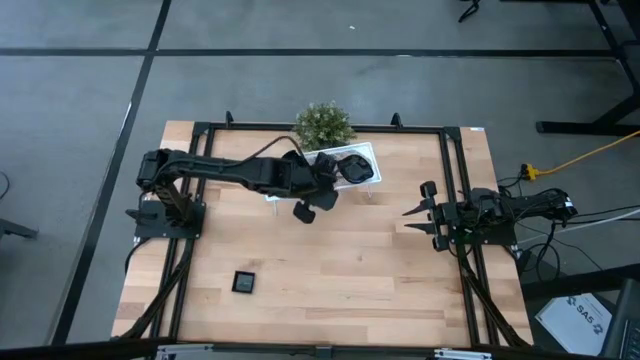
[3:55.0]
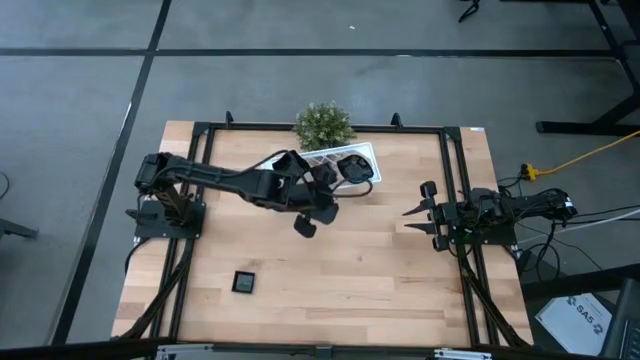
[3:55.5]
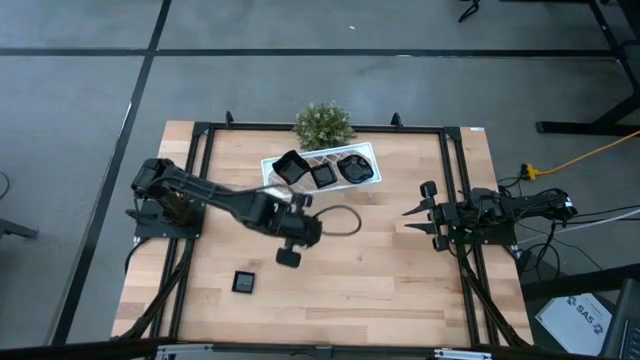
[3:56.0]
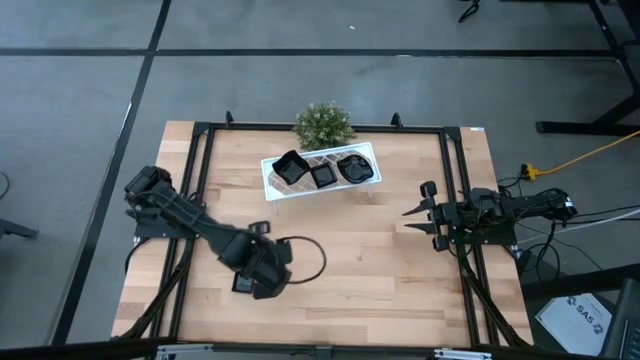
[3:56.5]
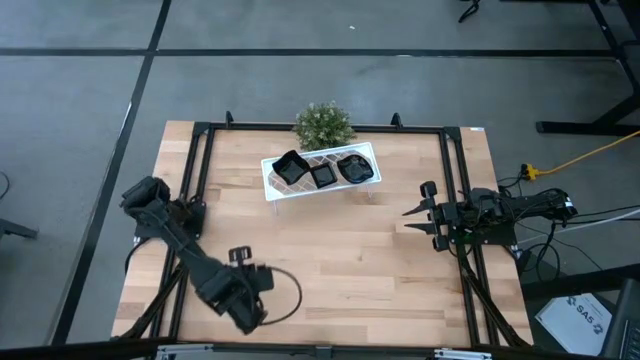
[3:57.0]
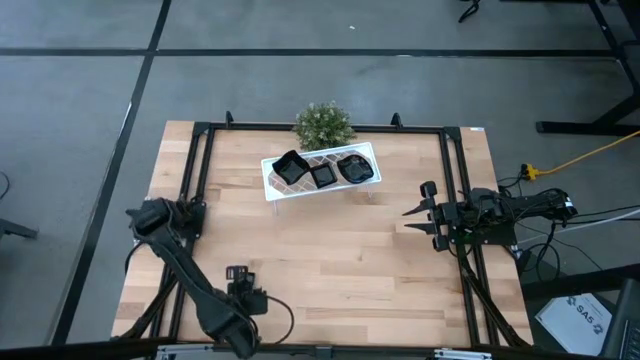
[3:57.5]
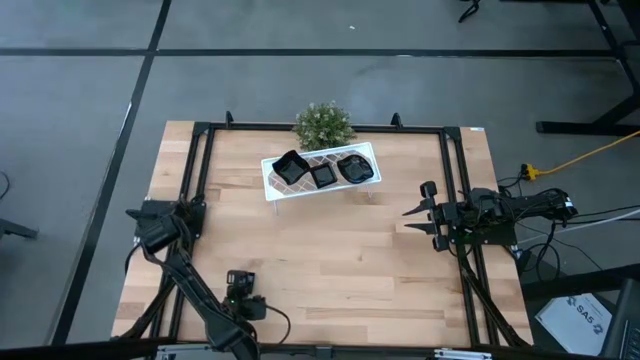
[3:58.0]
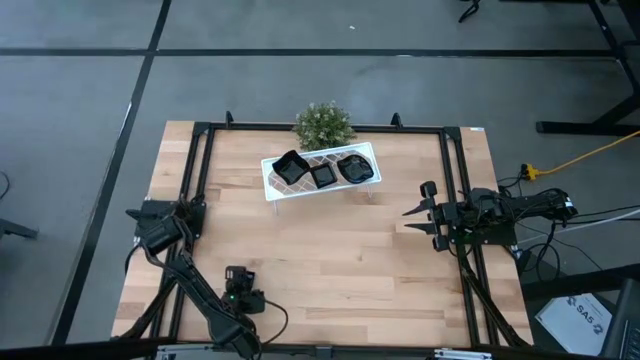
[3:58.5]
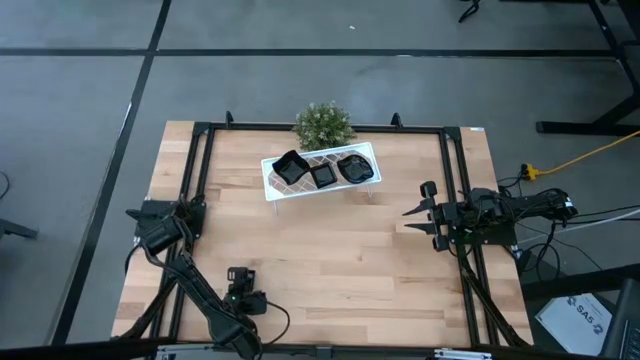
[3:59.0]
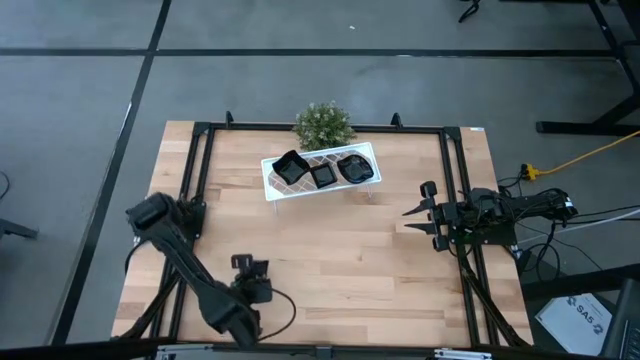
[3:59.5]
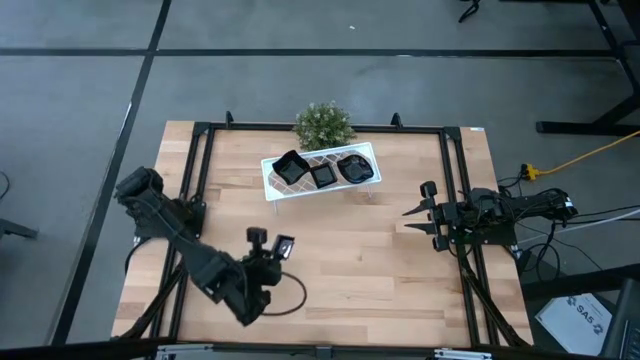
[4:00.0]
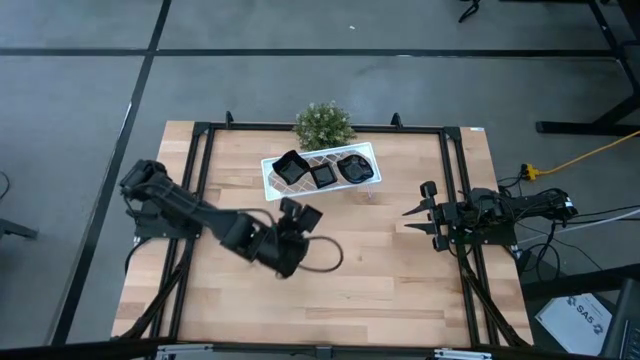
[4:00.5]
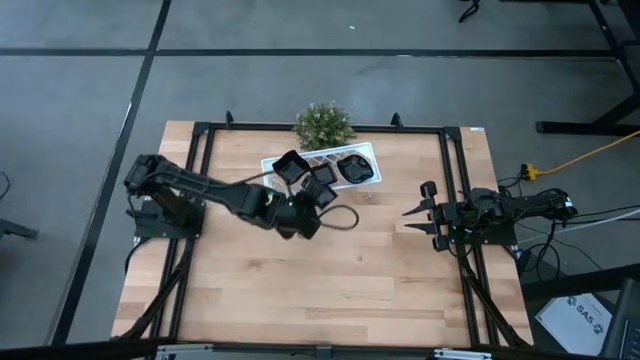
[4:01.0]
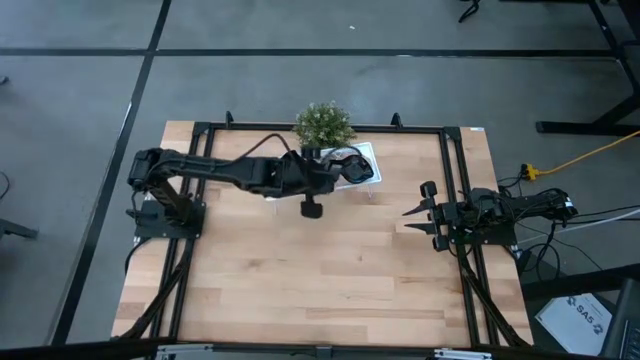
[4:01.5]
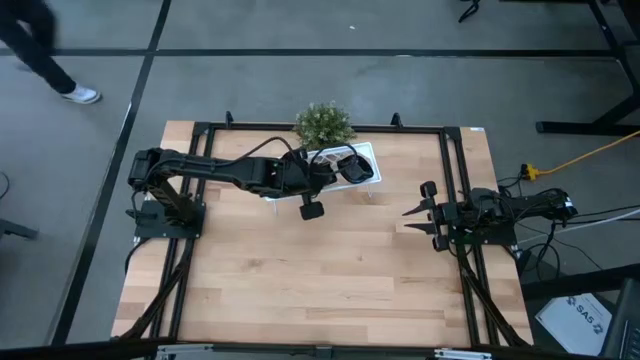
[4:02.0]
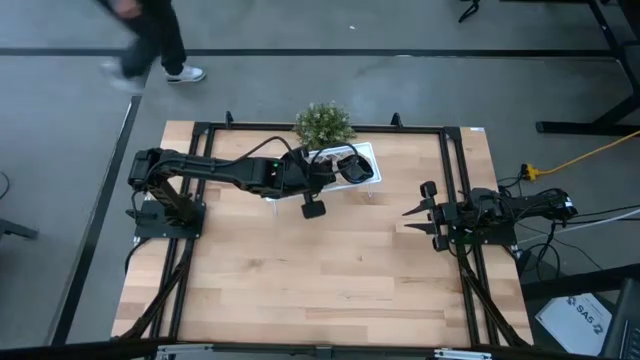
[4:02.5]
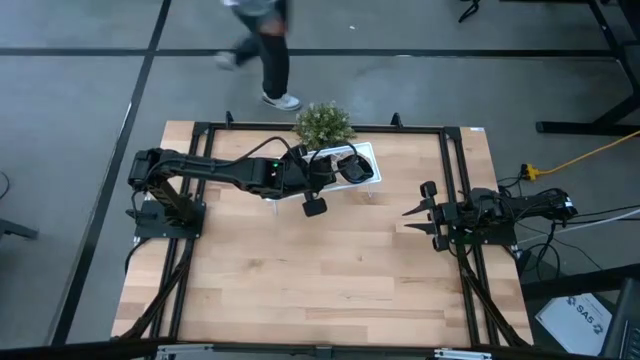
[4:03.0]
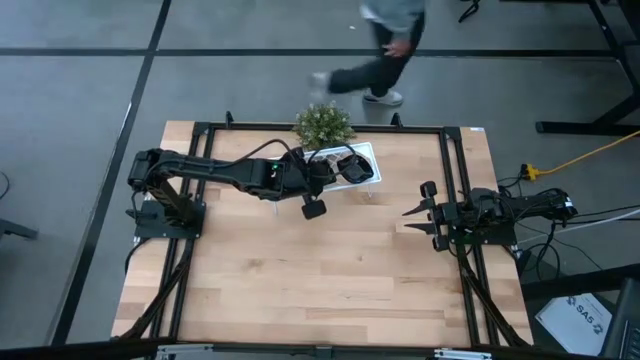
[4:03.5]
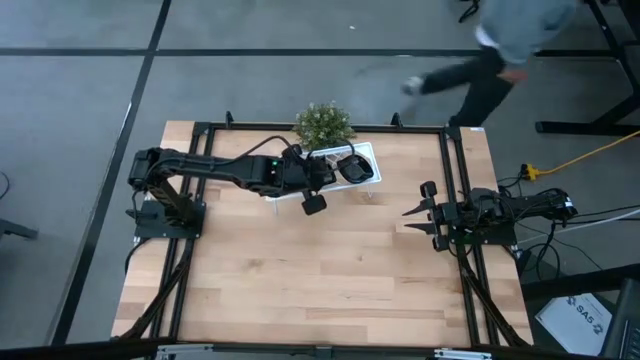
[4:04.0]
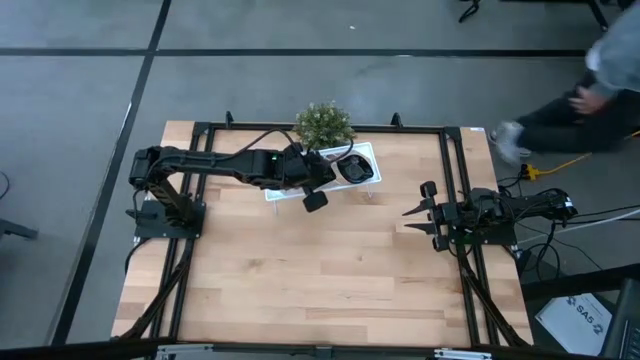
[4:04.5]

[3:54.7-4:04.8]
Task: Pick & Place Mini shaped plates
Stack the square plate on top of the square plate on the shelf

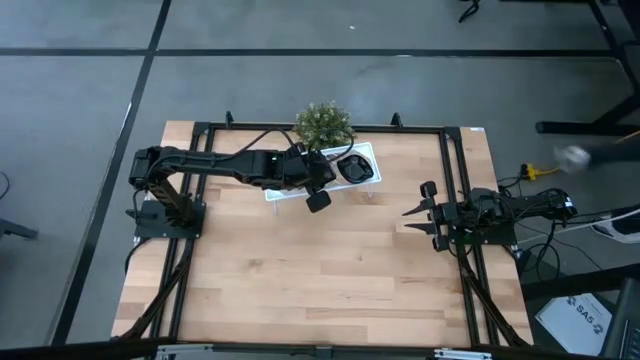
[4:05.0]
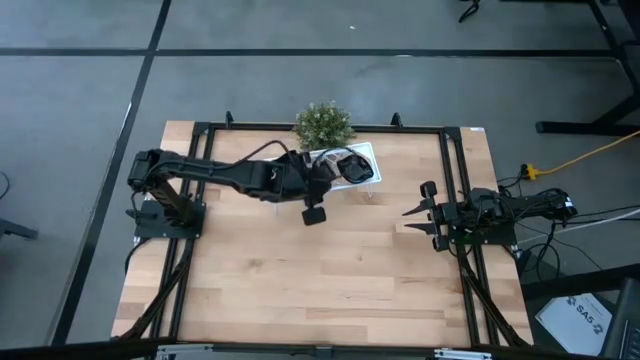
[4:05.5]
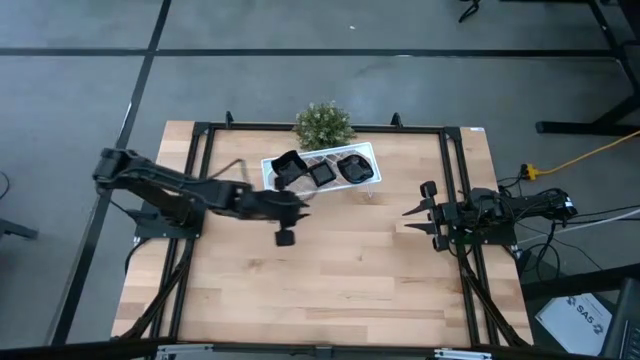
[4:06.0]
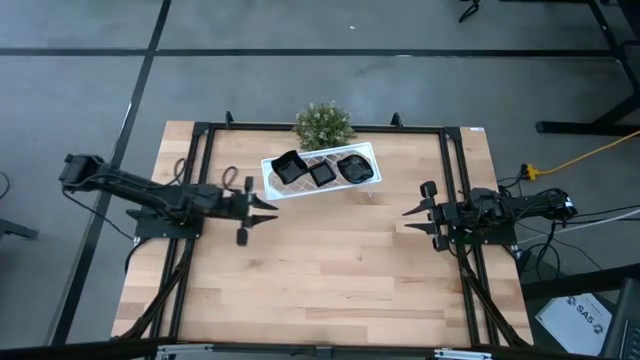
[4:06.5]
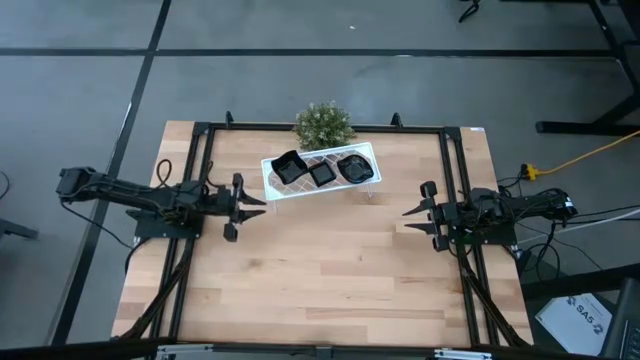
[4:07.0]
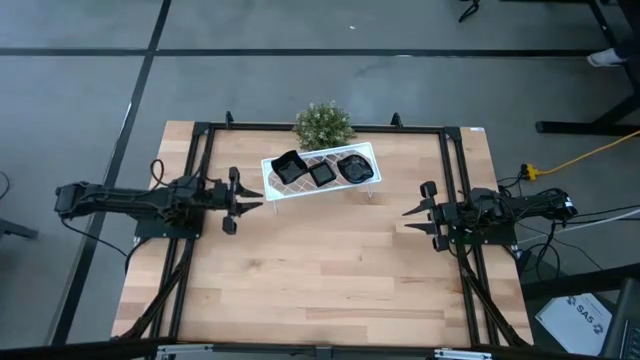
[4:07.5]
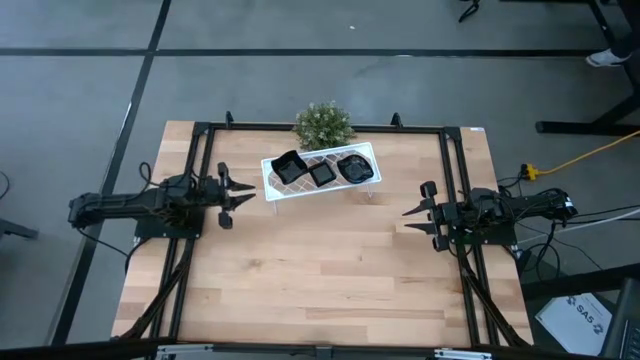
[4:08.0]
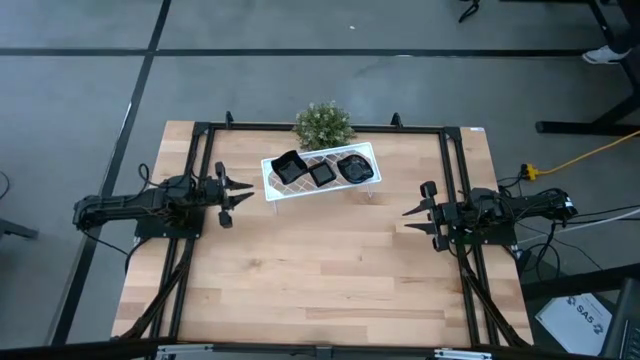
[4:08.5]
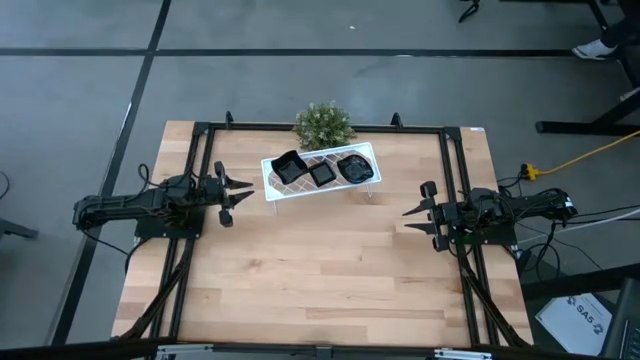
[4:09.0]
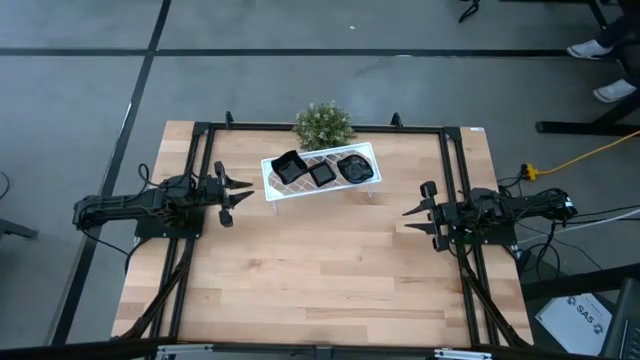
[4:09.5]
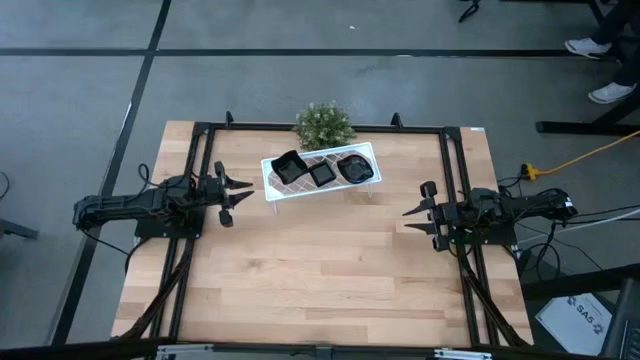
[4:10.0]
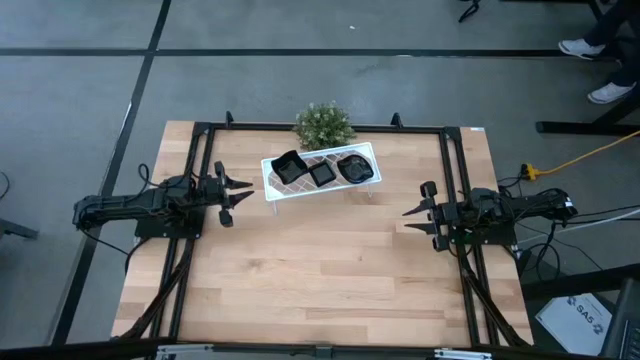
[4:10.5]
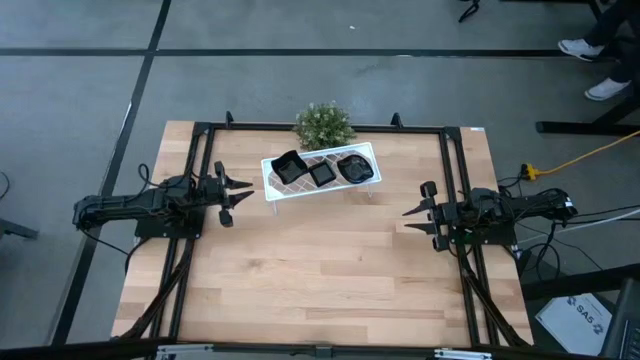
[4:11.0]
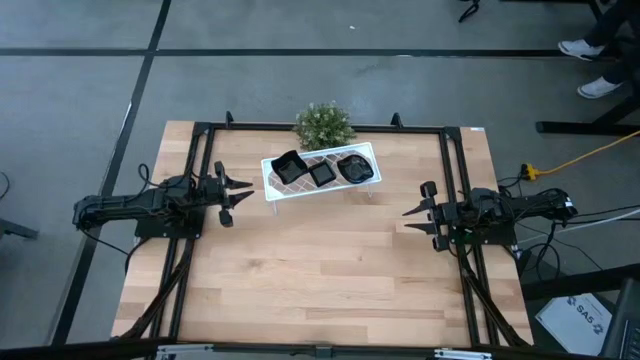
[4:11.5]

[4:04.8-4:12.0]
Return to Home Position

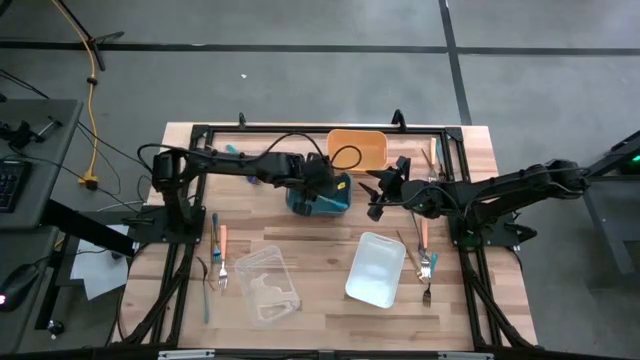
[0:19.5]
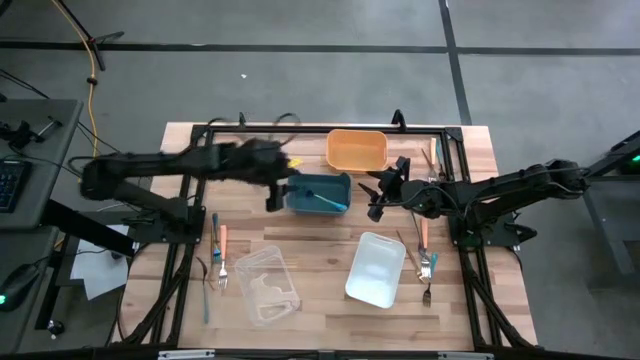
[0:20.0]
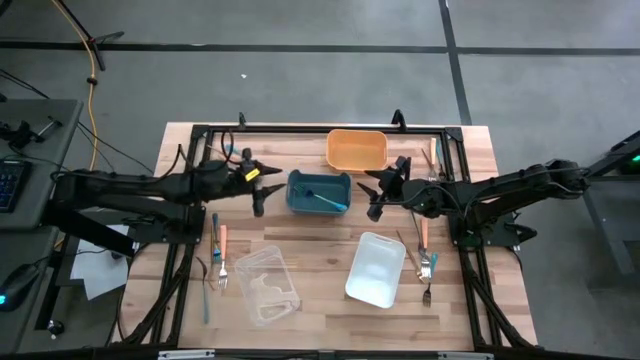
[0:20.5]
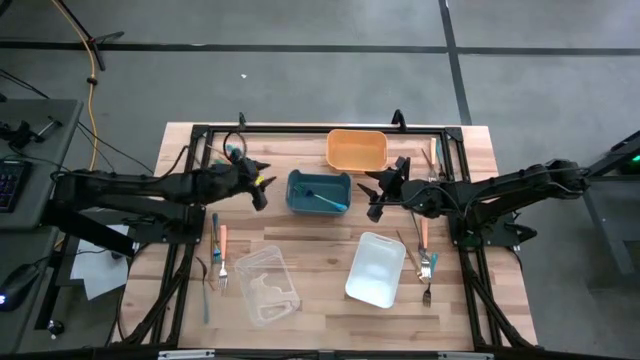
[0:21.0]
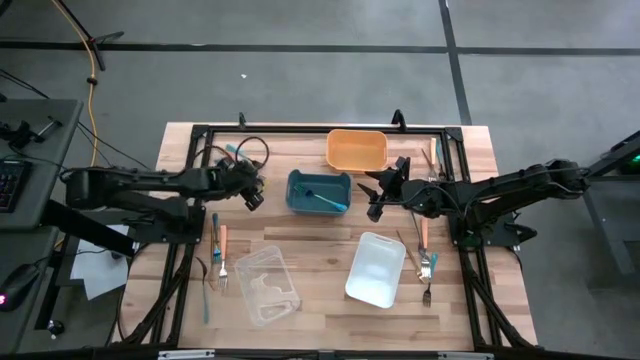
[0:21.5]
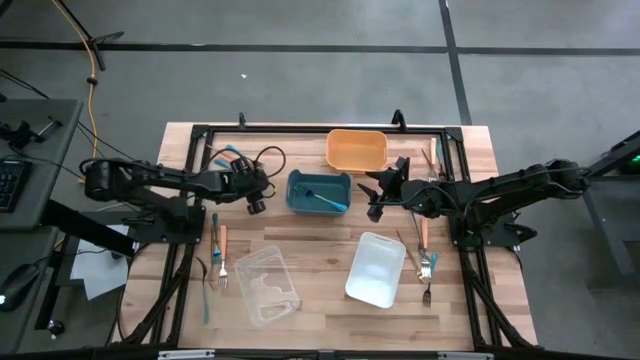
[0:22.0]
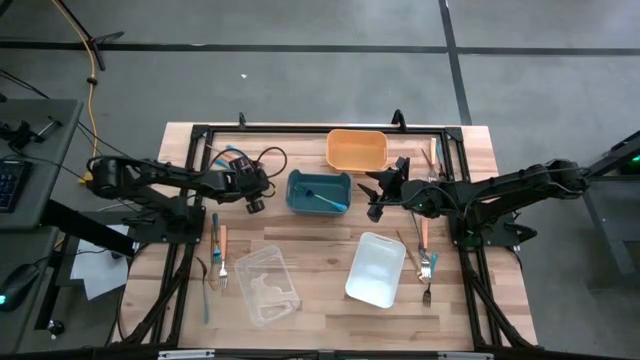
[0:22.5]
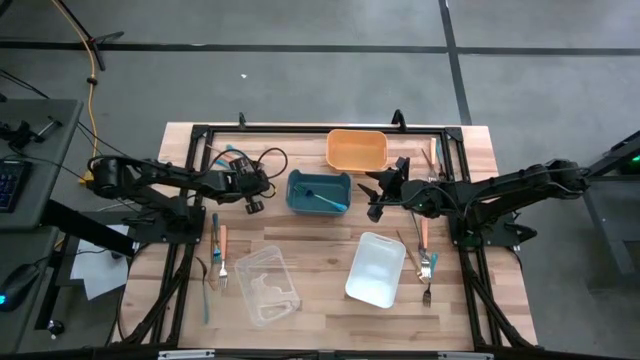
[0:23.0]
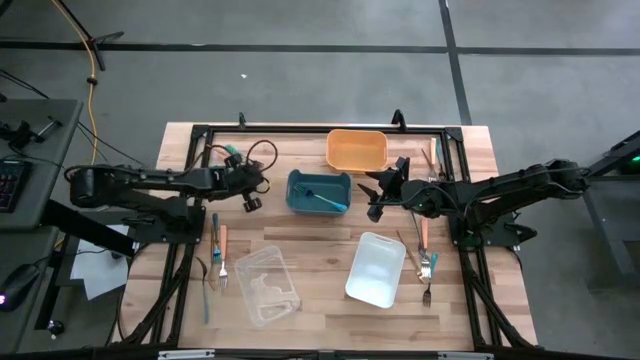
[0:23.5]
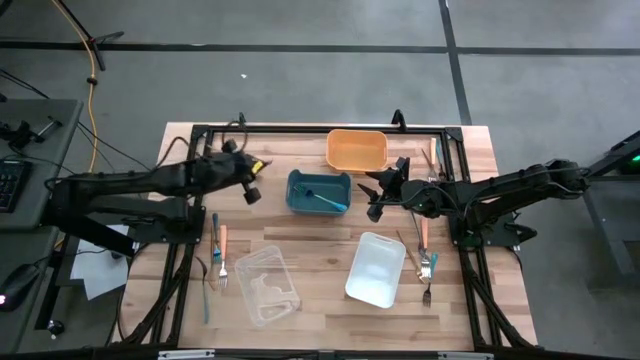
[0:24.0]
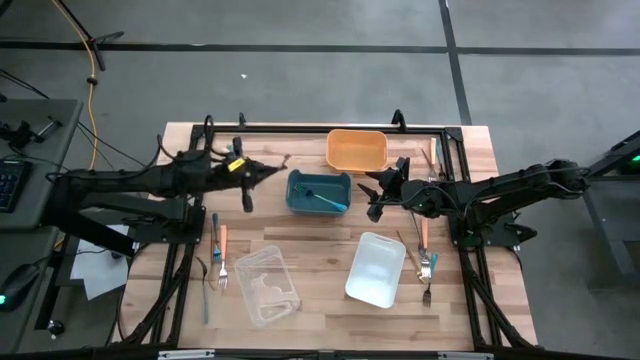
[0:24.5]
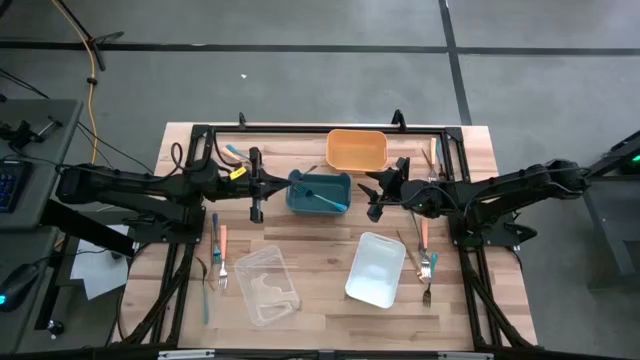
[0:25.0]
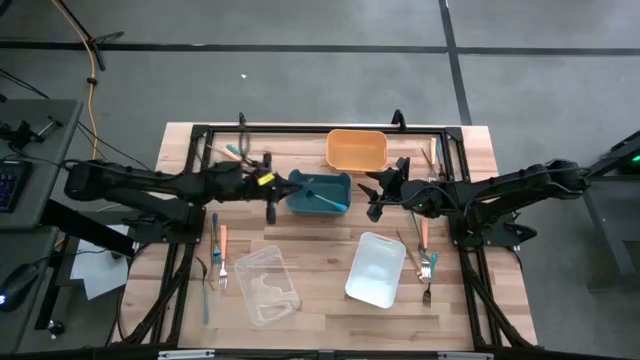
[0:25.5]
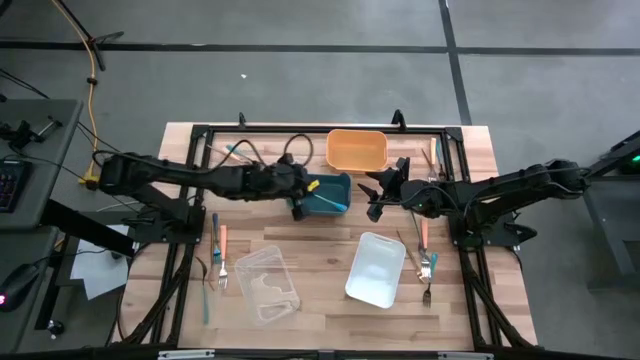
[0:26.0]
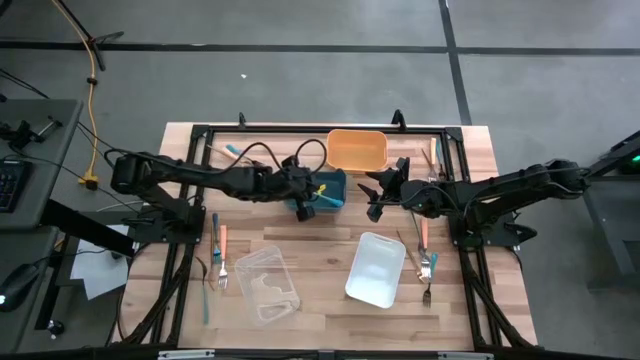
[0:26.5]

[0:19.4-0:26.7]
Task: Sort silverware by color (type)
Put the blue fork into the blue bin
